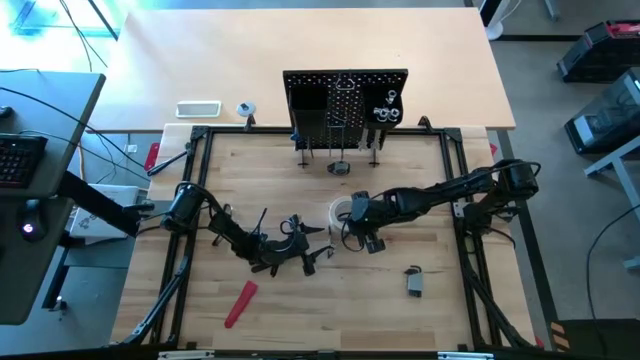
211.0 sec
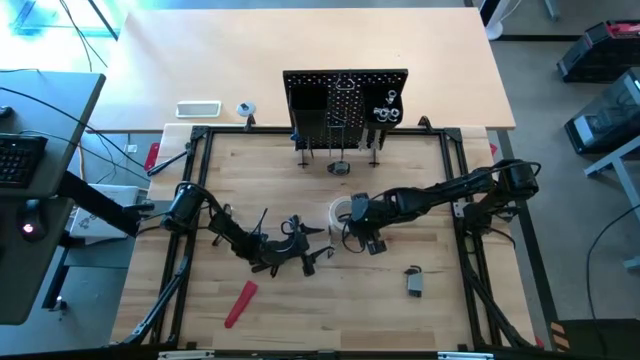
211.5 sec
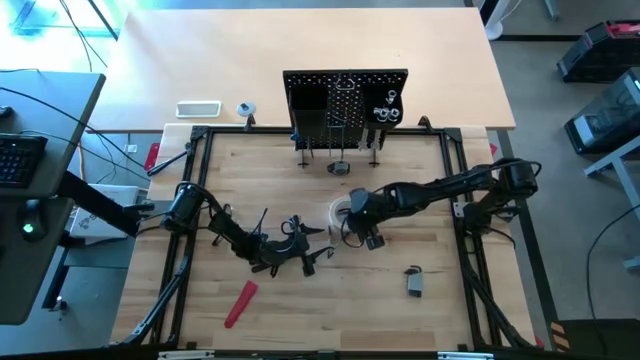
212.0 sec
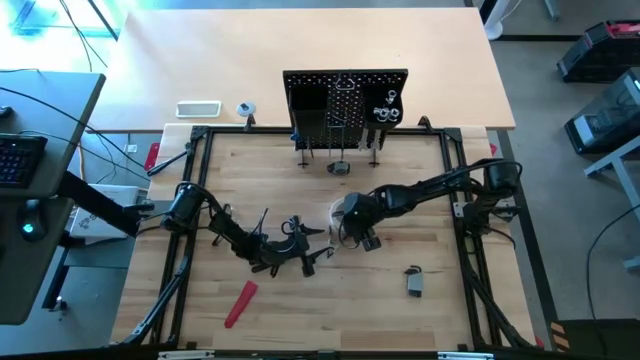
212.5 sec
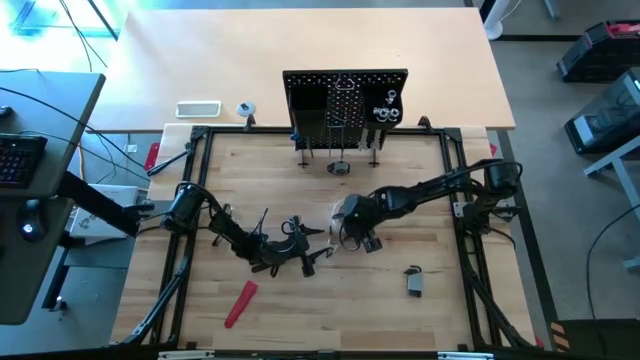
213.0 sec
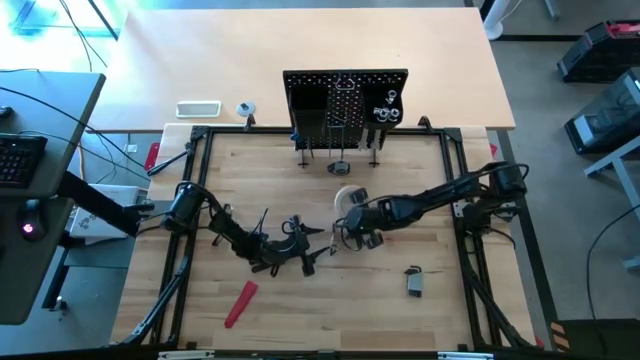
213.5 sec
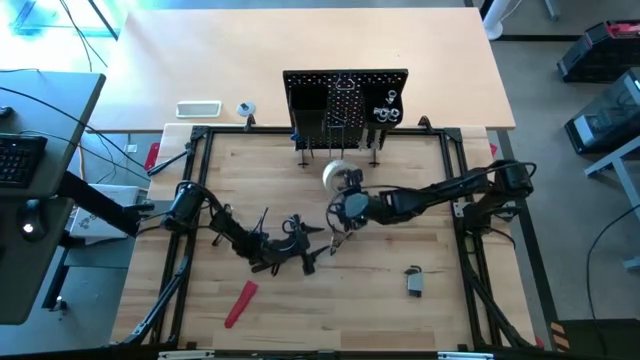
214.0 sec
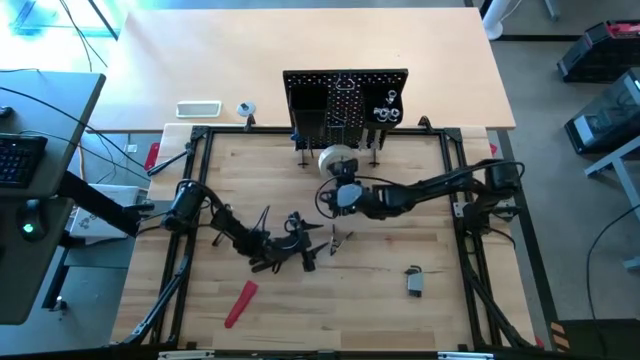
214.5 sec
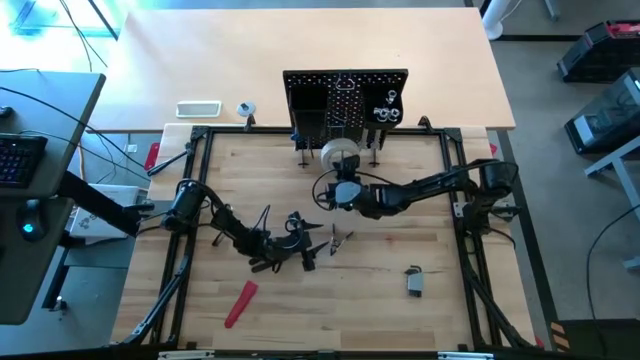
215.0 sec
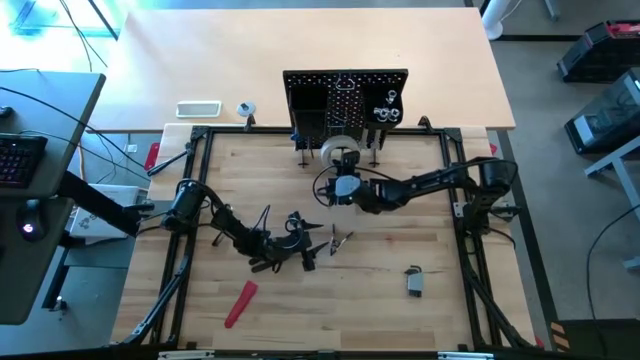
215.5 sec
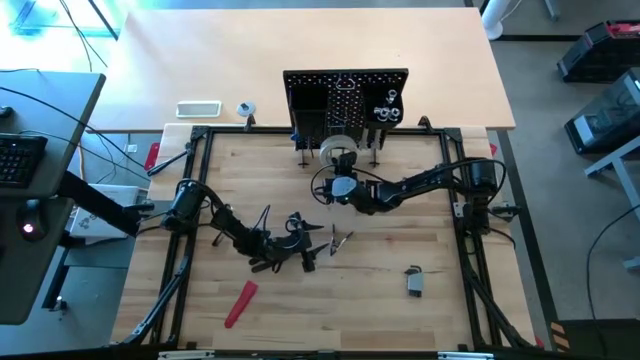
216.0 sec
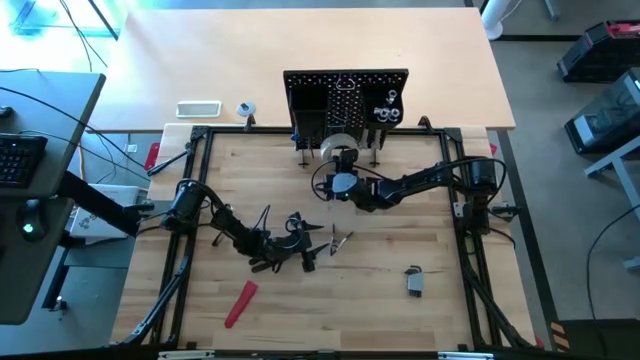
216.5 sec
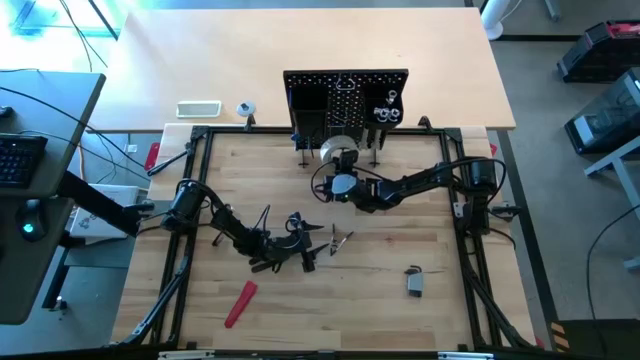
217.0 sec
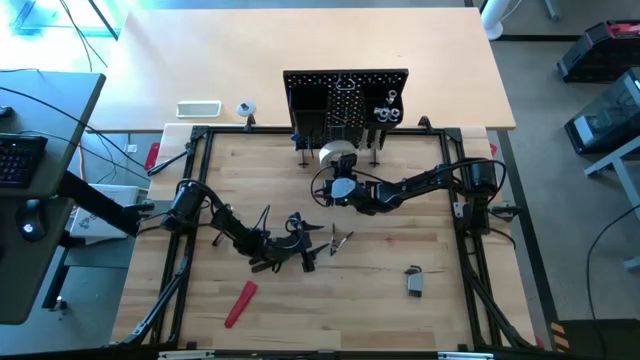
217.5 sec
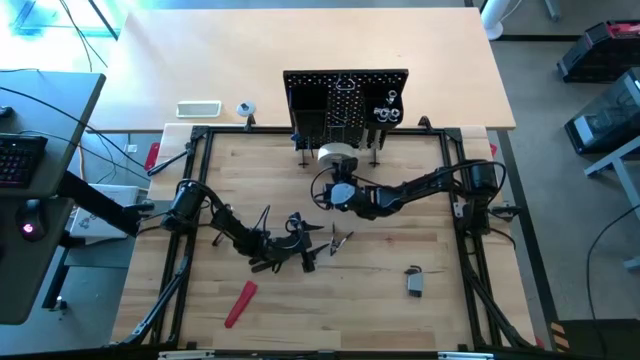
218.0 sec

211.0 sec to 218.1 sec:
Task: Hang tools onto peg board
Hang the white masking tape on the peg board

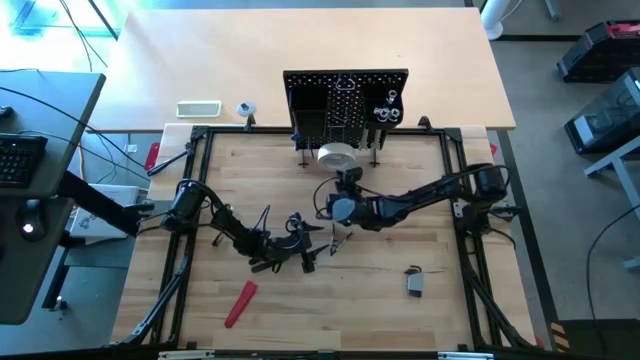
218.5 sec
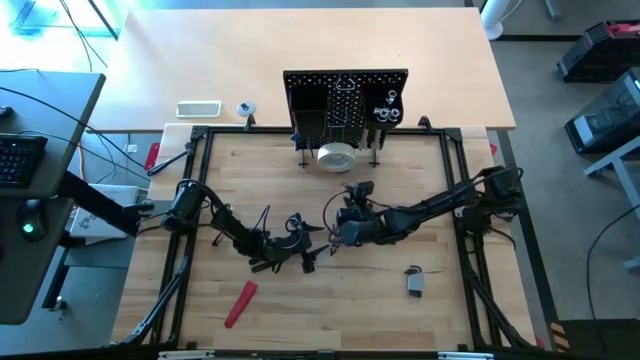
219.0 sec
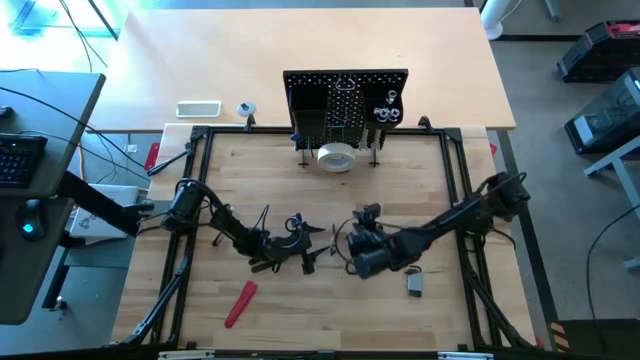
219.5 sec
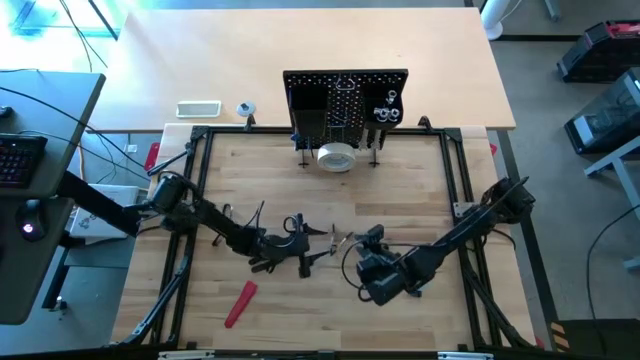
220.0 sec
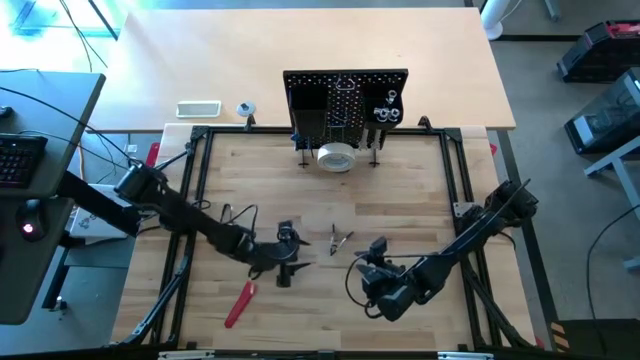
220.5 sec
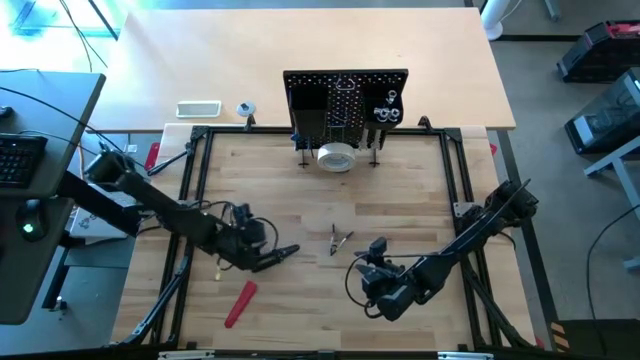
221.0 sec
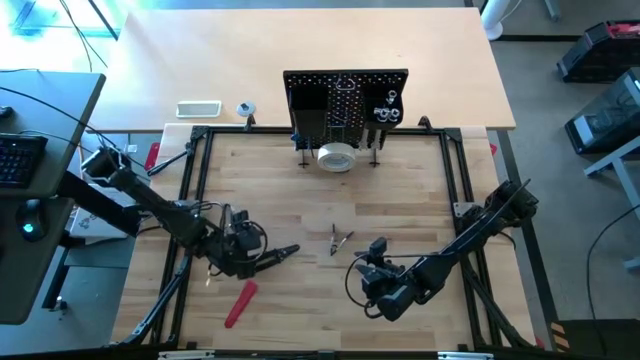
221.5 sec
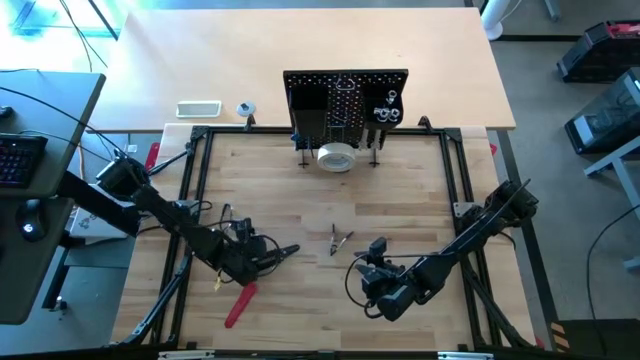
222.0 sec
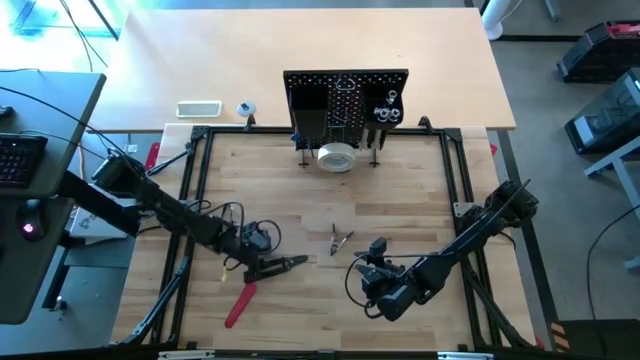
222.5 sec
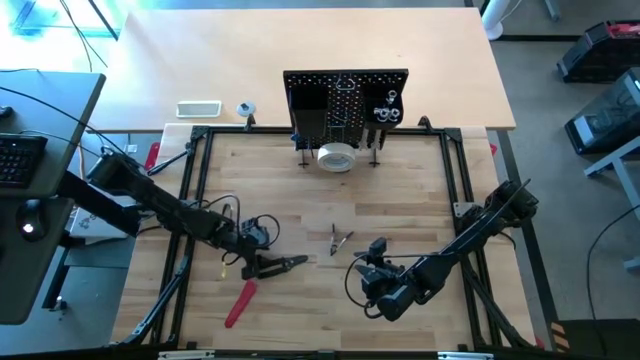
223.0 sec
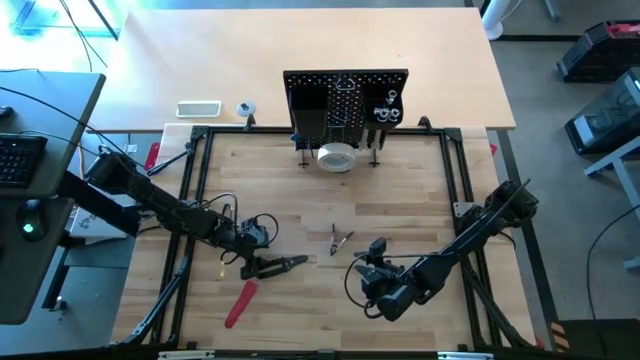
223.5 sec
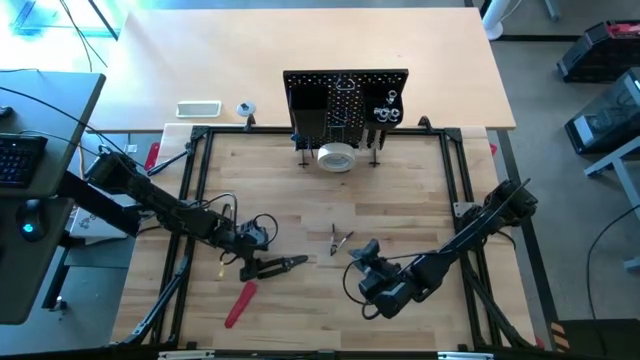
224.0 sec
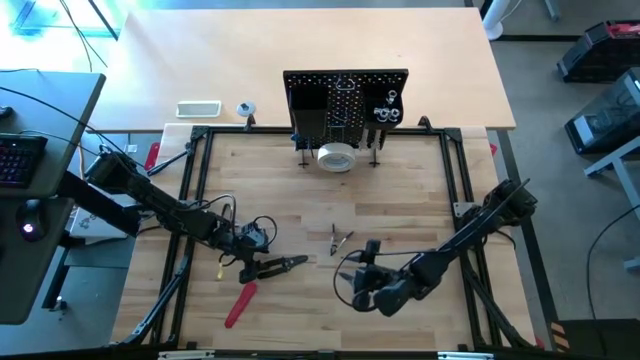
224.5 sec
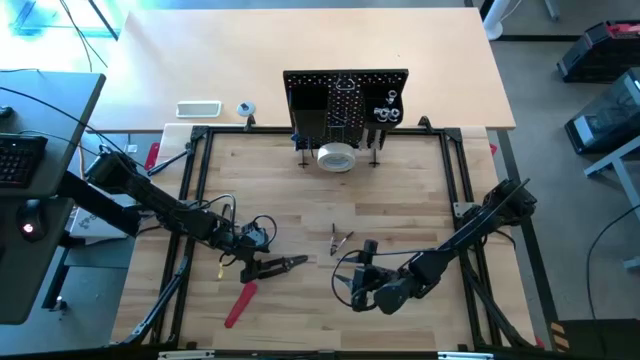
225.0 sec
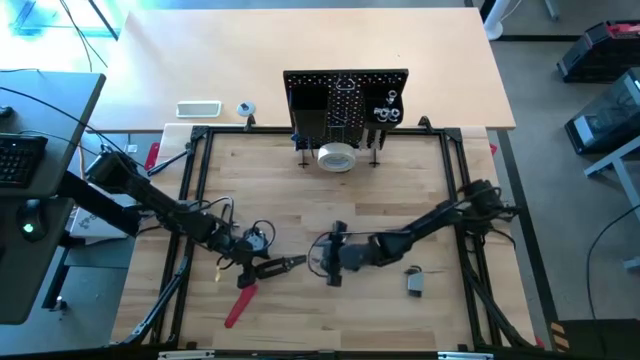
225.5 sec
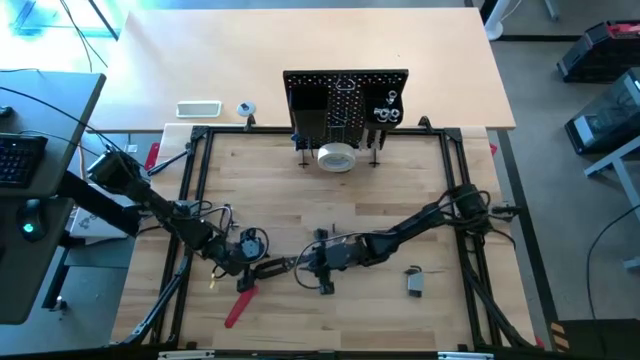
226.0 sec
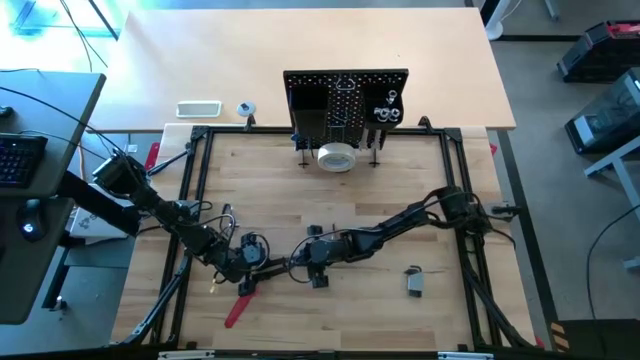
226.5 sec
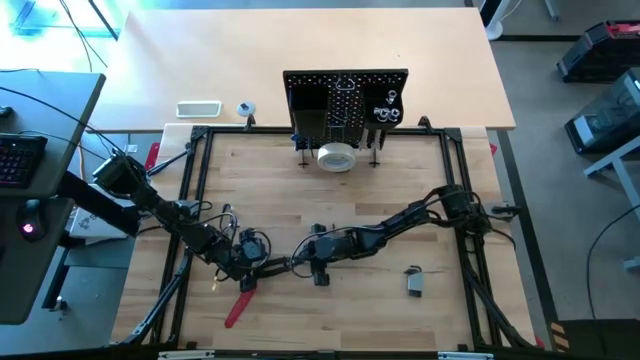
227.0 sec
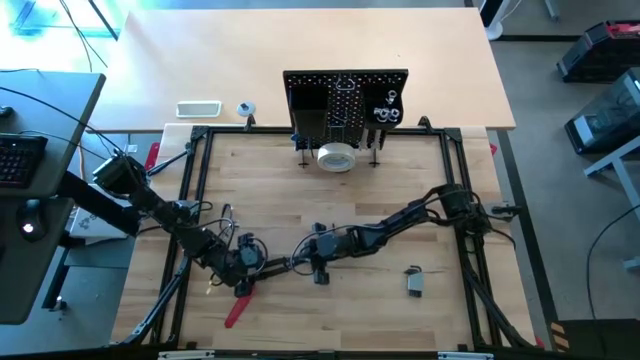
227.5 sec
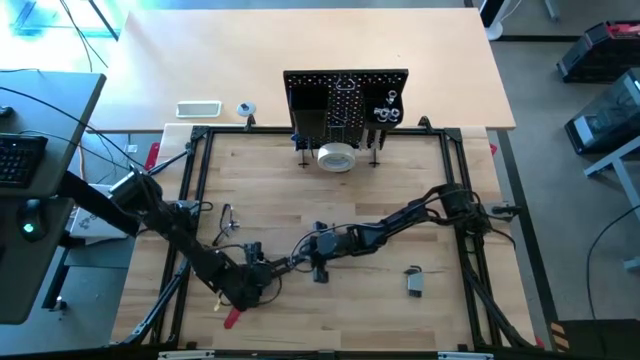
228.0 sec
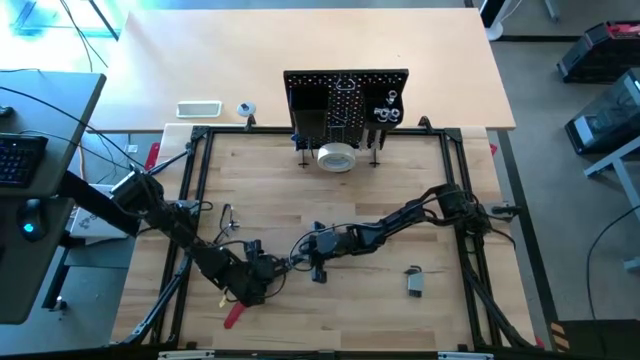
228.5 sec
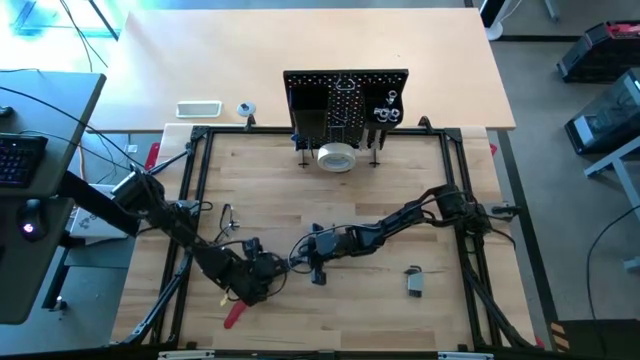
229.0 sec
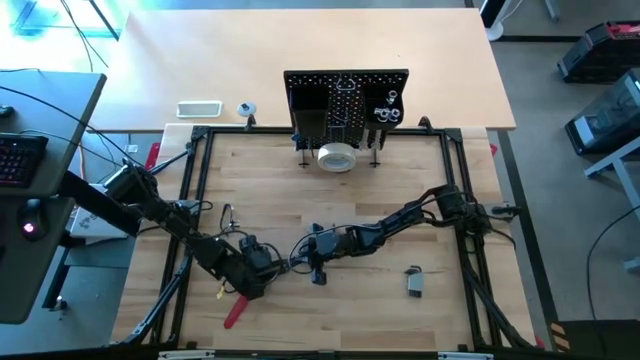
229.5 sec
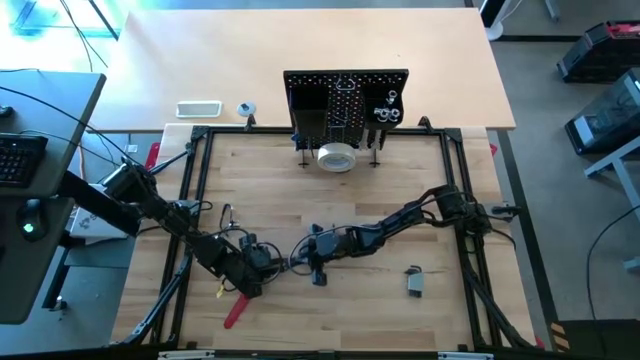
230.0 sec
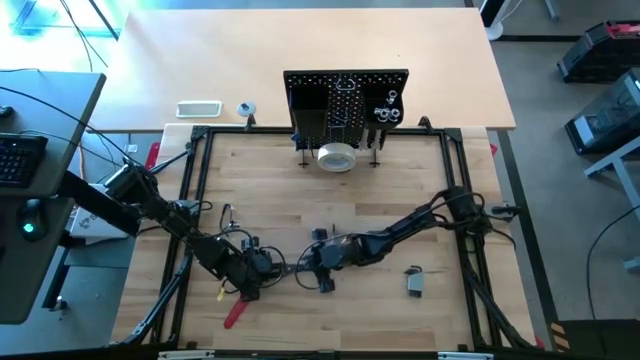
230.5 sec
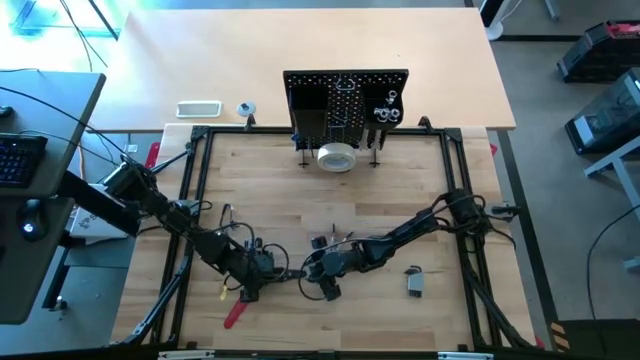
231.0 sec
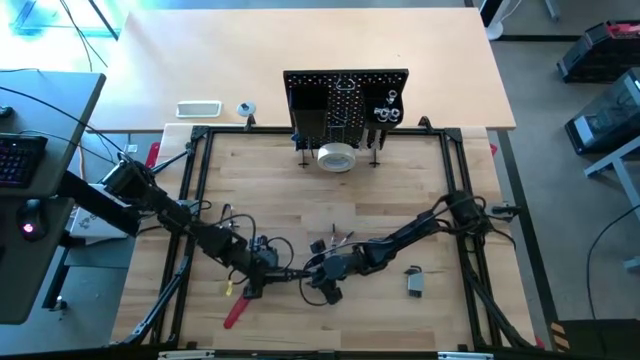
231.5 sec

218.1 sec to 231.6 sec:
Hang the black wire stripper on the peg board
